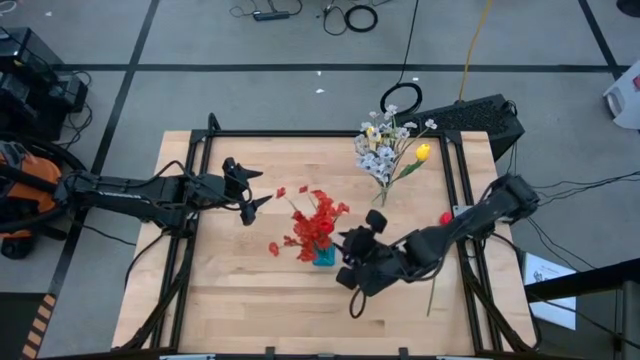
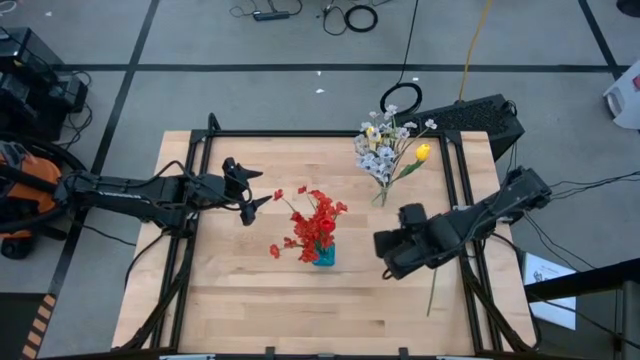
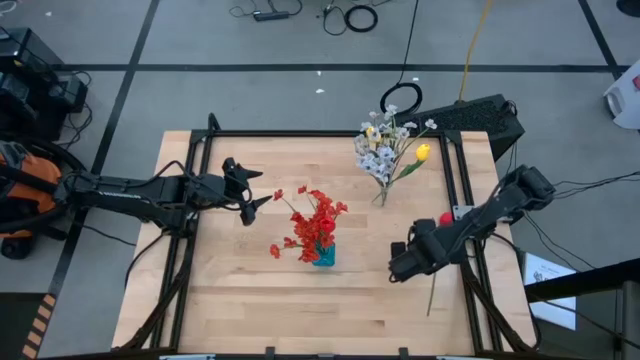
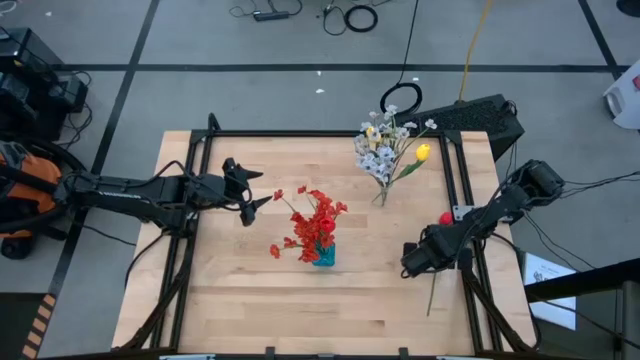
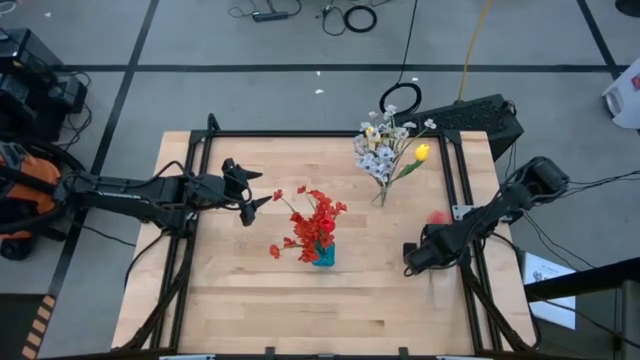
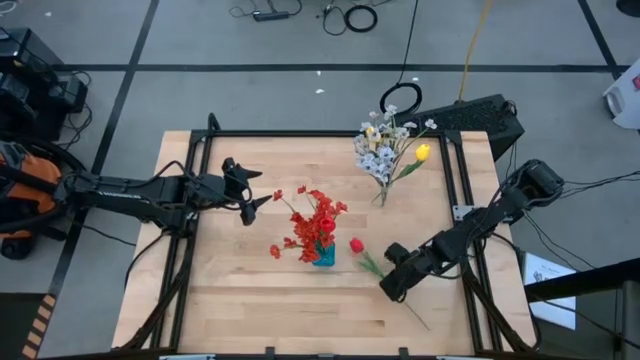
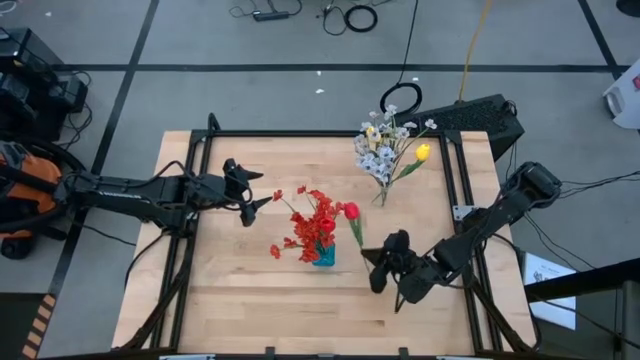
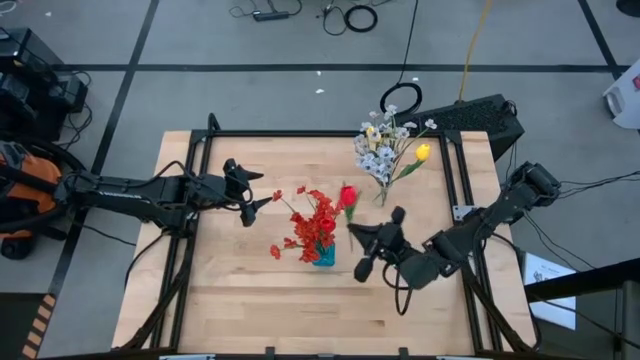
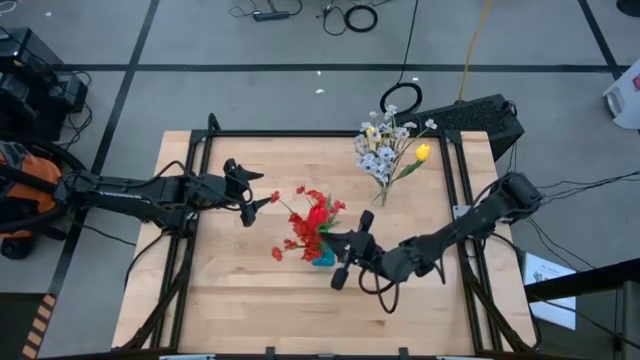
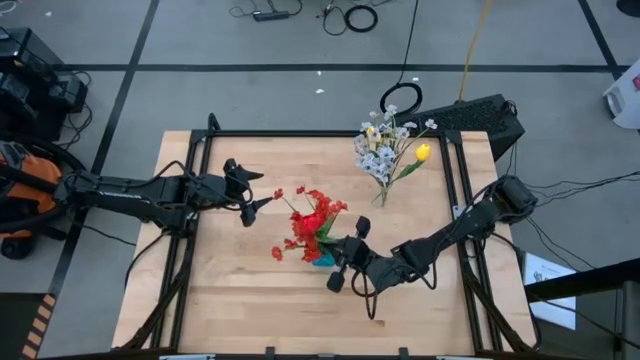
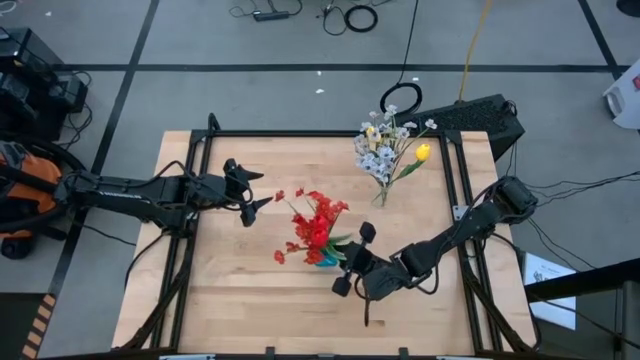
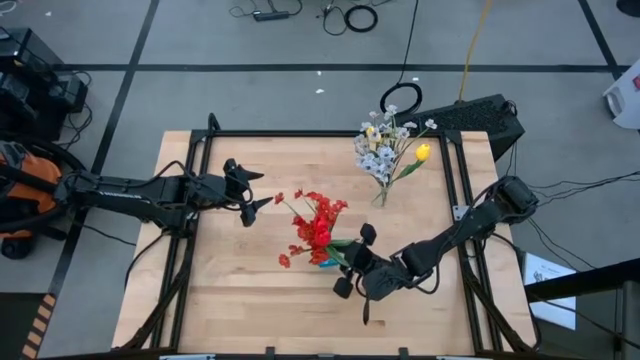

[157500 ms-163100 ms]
Task: Sort flowers into vase by color
Put the red flower into the blue vase

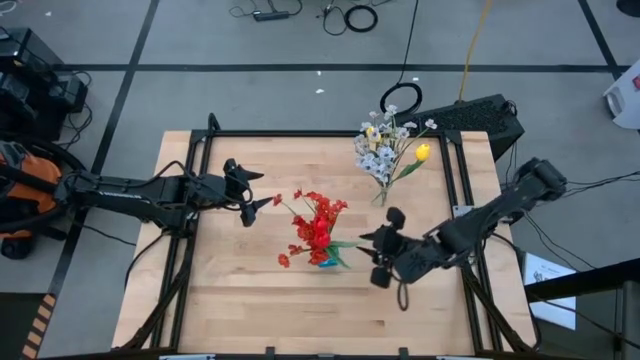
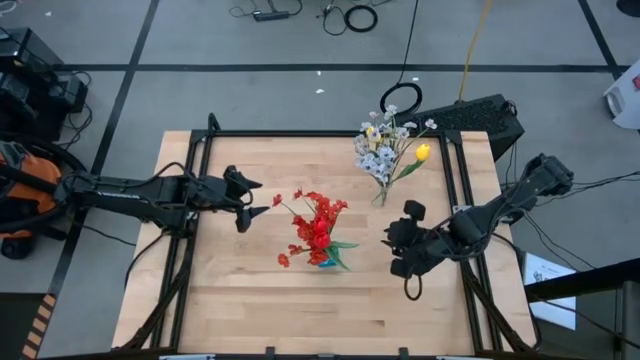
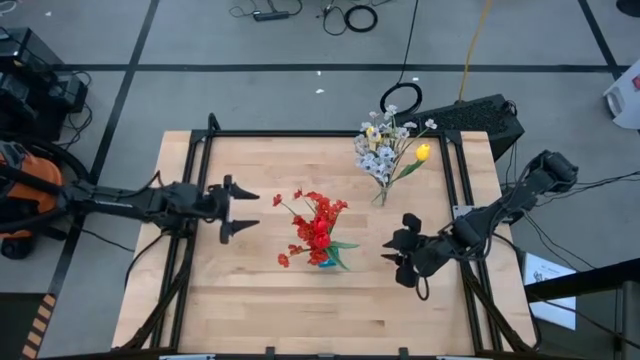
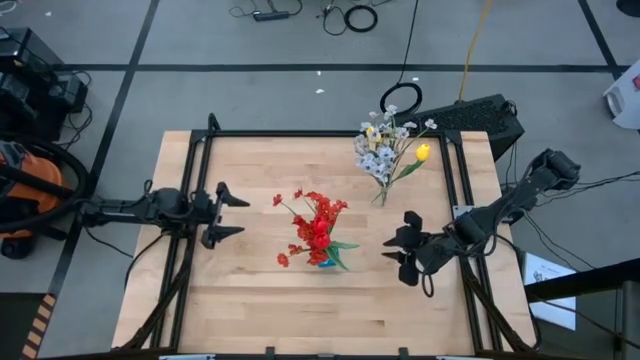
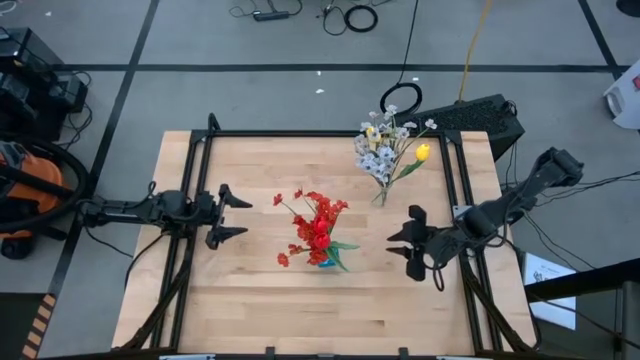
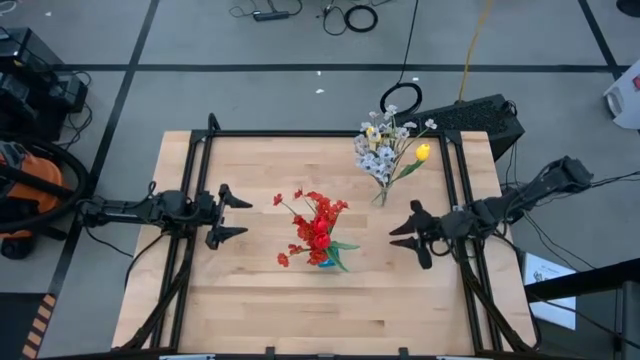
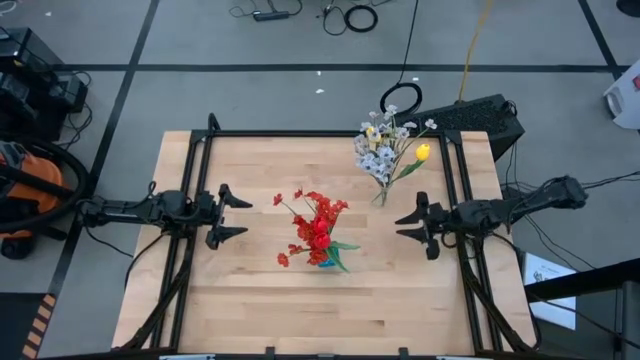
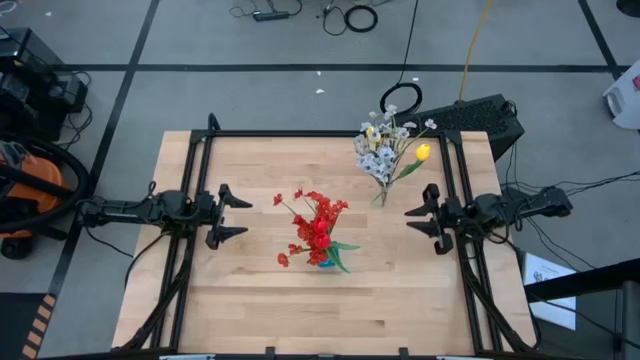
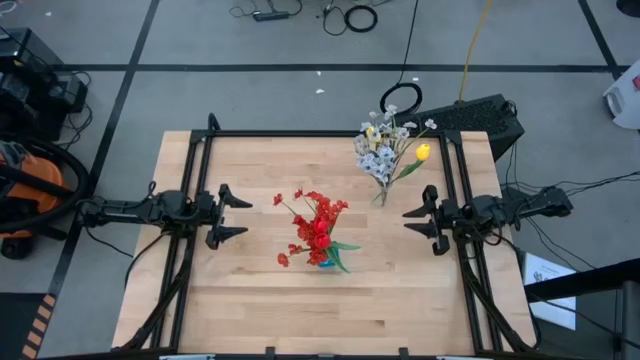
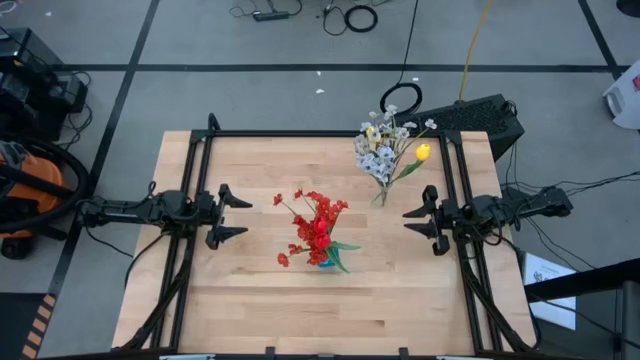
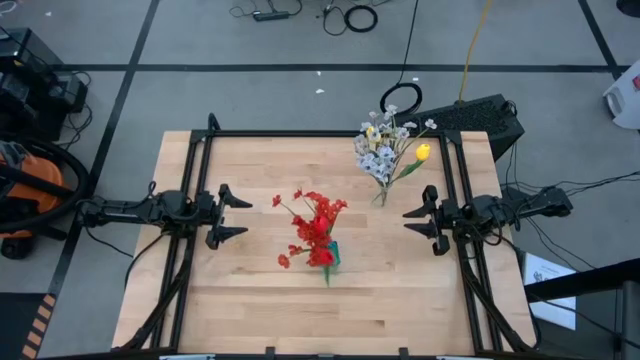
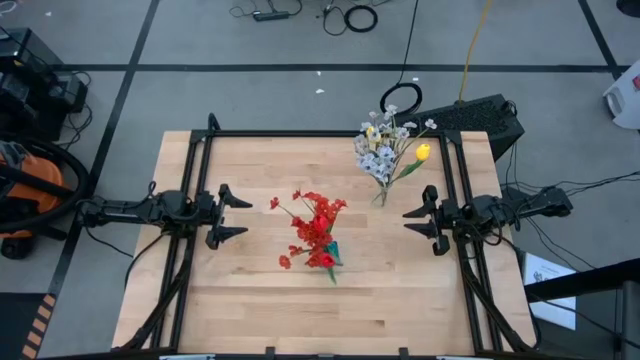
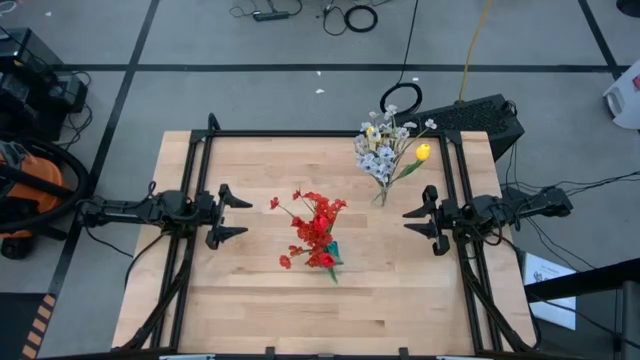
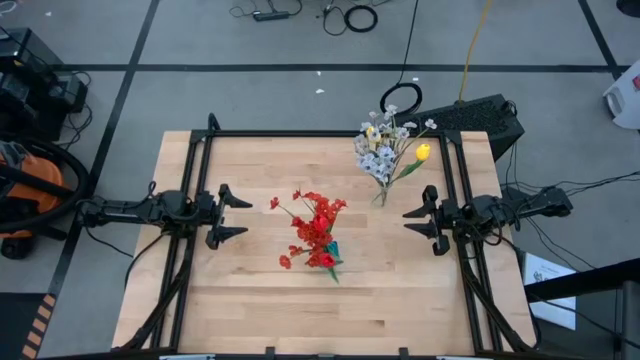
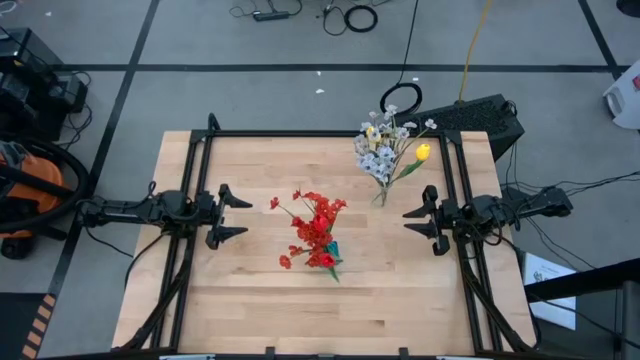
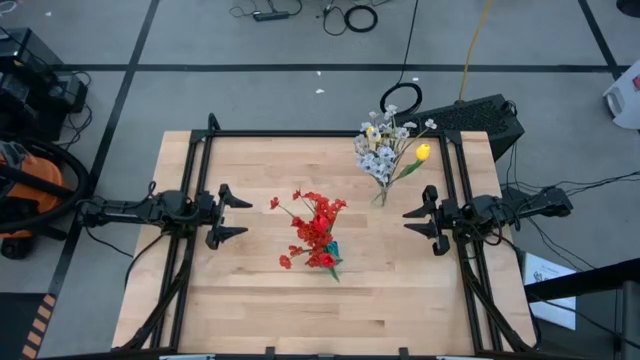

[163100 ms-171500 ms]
Return to Home Position

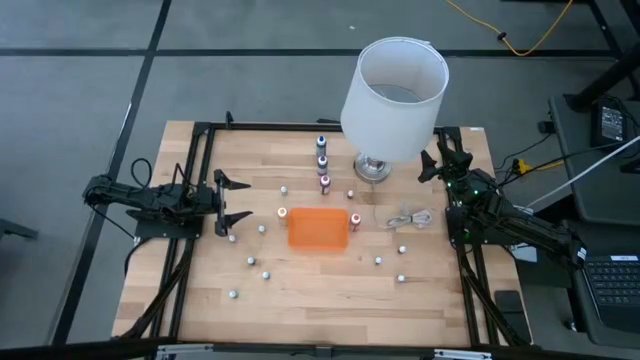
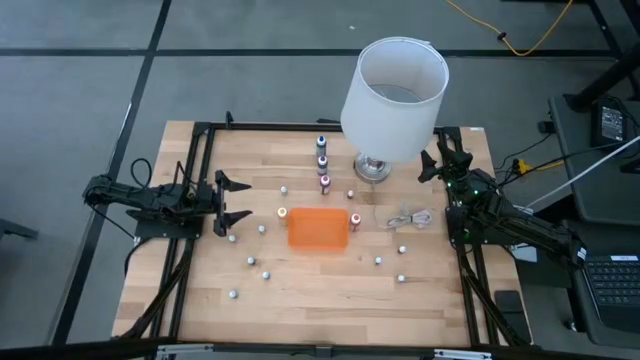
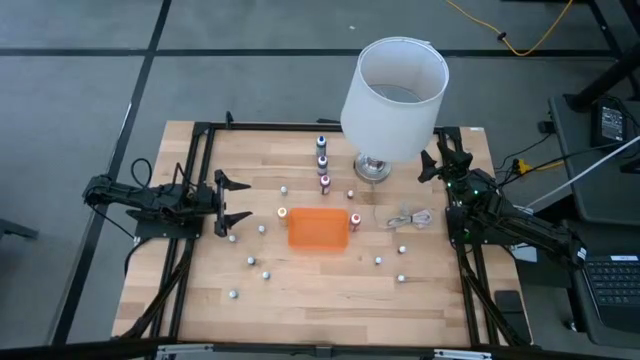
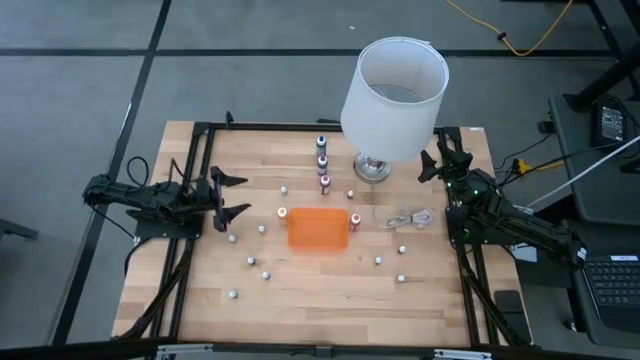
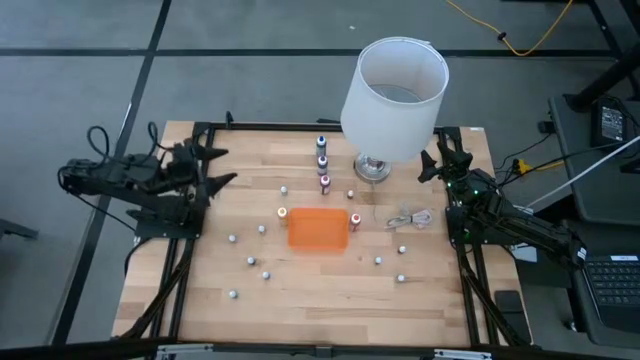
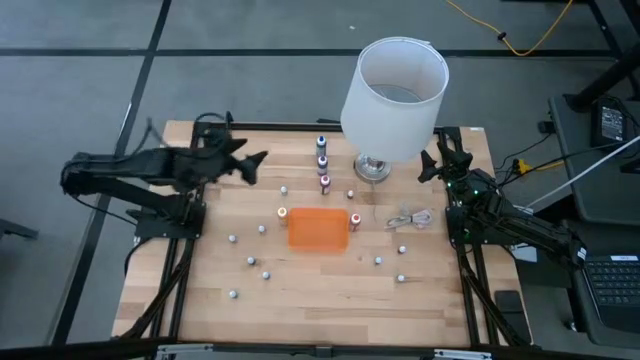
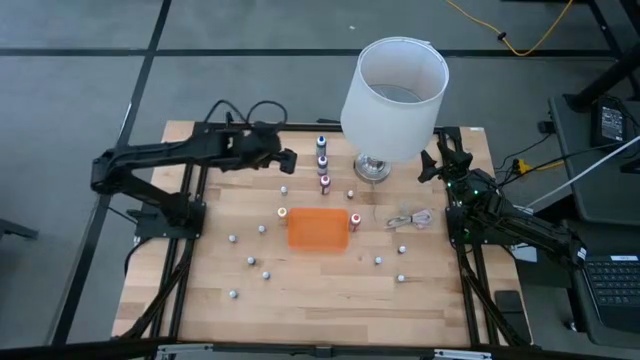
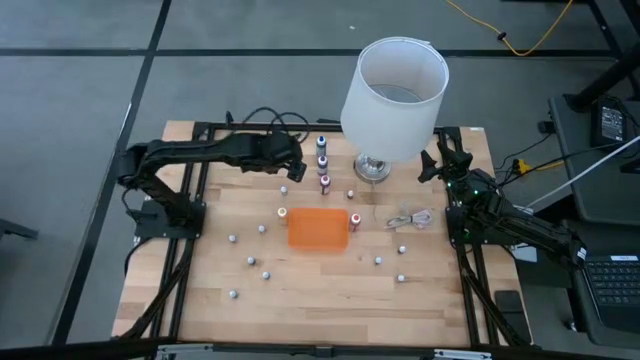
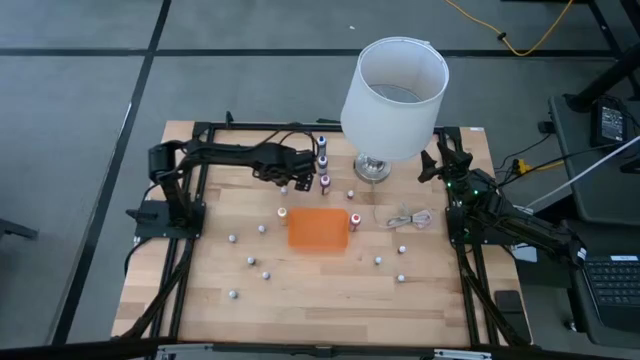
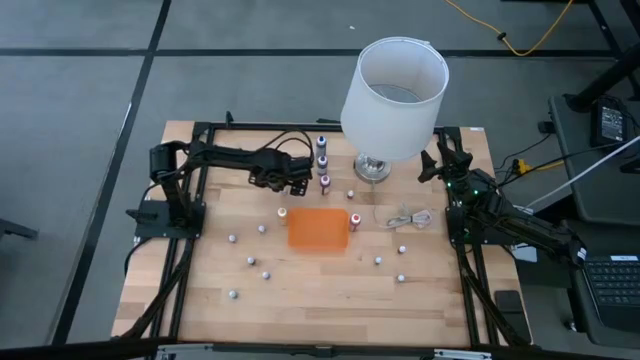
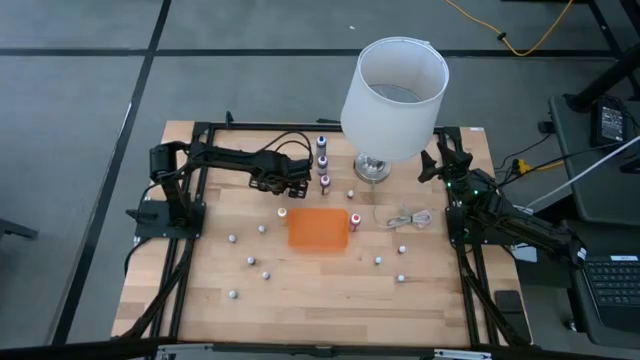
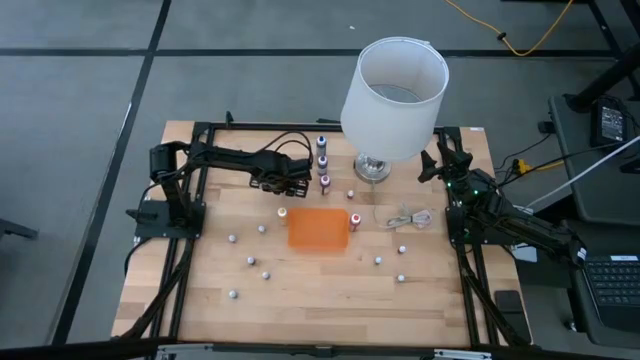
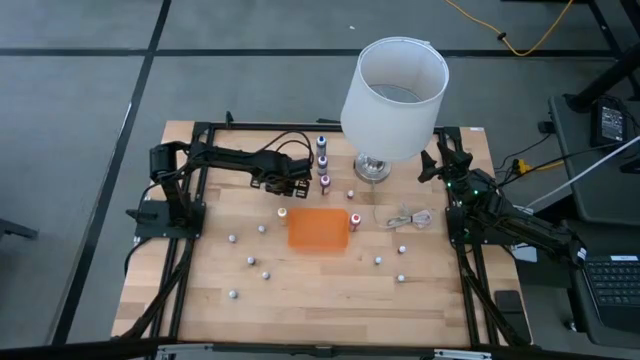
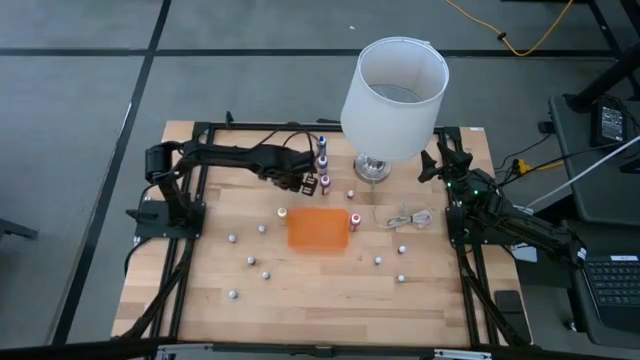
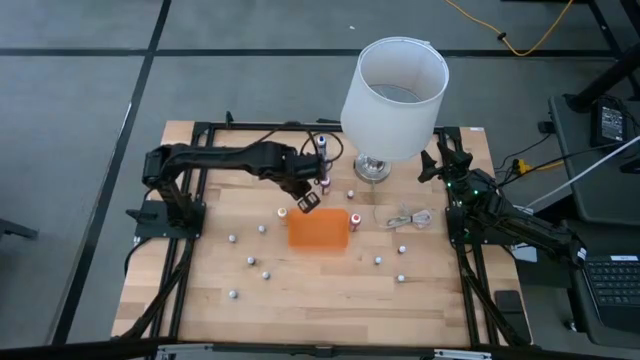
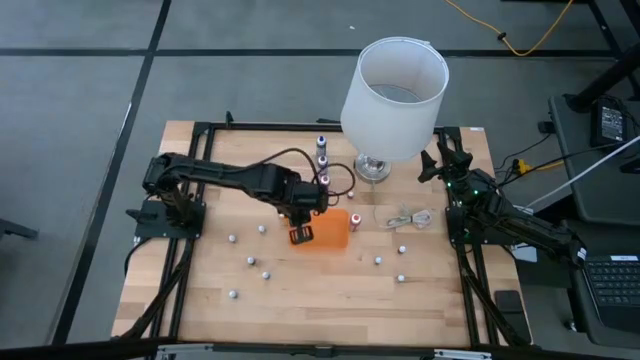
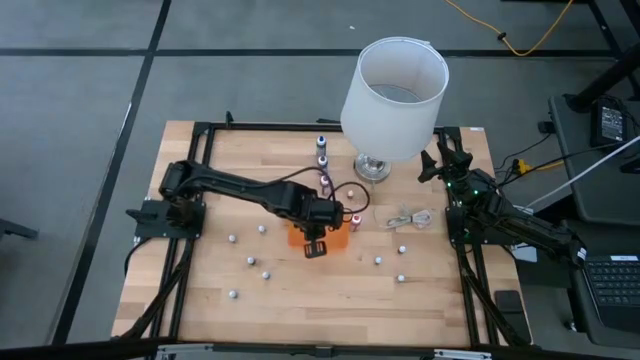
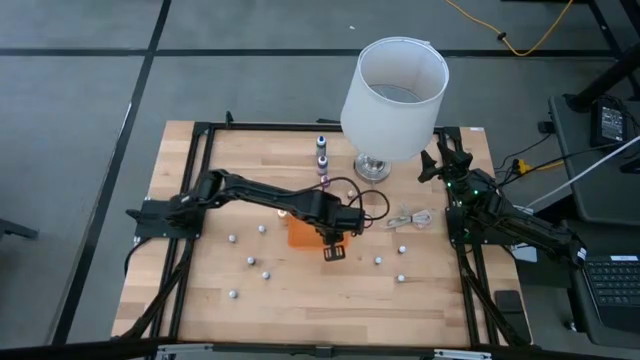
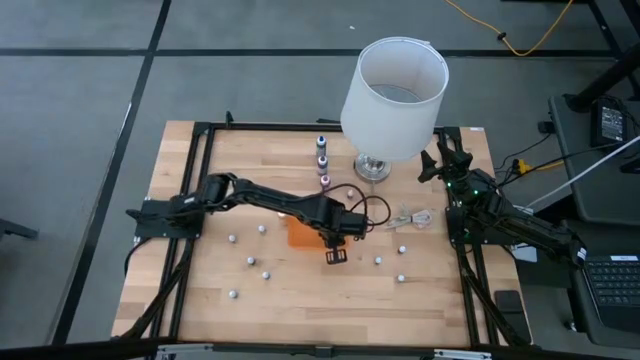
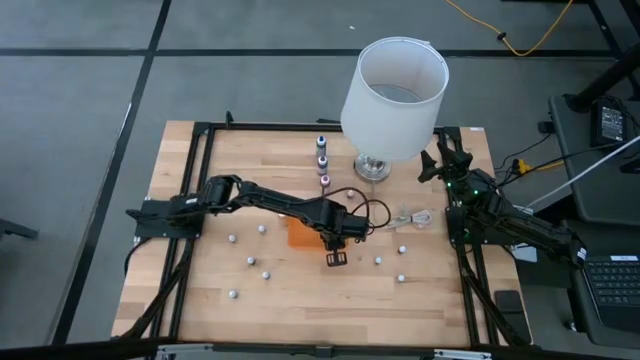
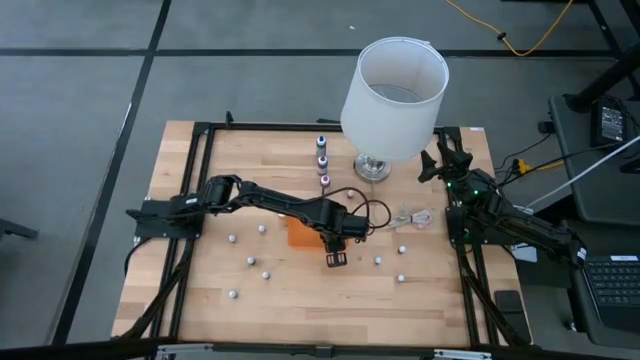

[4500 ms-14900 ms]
Task: Pick & Place food coloring
Put the small green food coloring bottle into the orange bin
